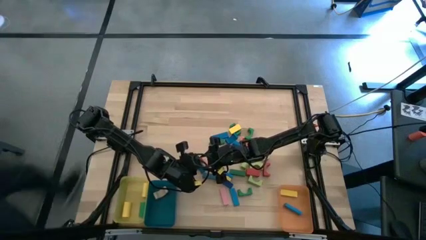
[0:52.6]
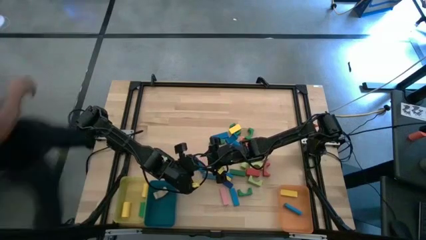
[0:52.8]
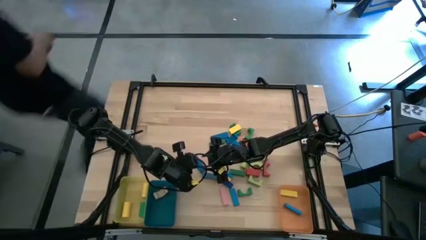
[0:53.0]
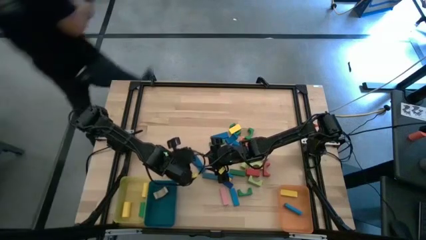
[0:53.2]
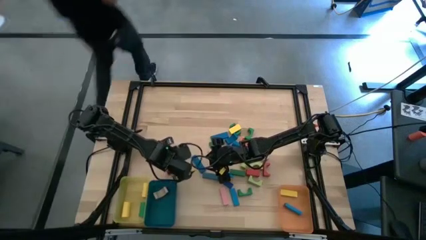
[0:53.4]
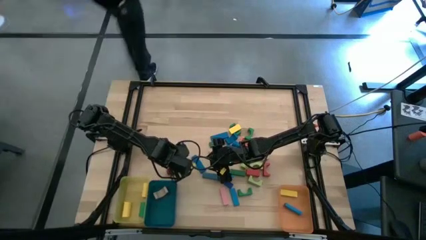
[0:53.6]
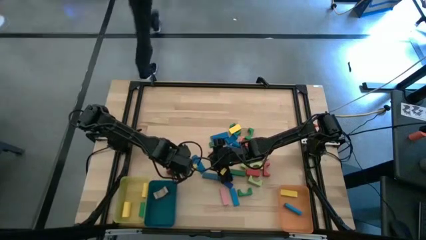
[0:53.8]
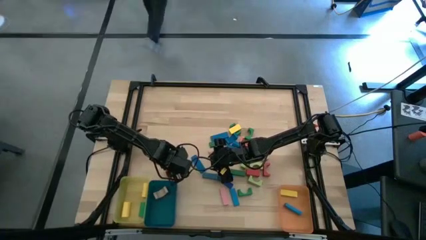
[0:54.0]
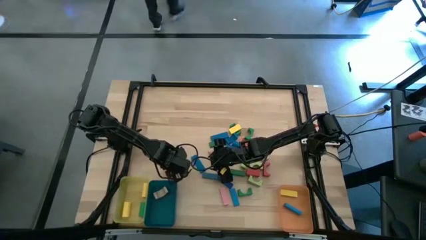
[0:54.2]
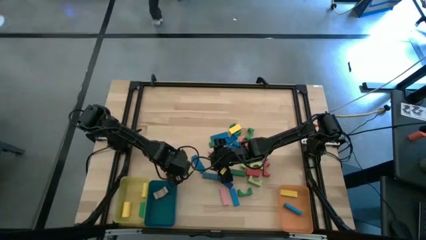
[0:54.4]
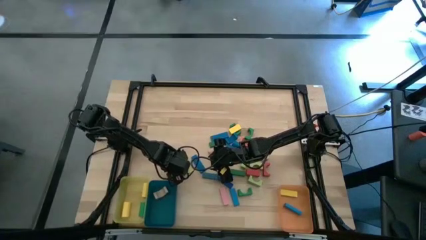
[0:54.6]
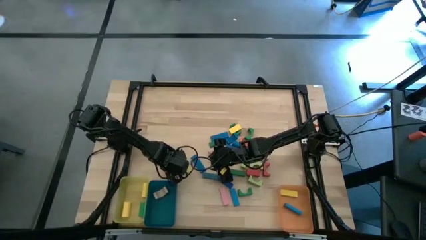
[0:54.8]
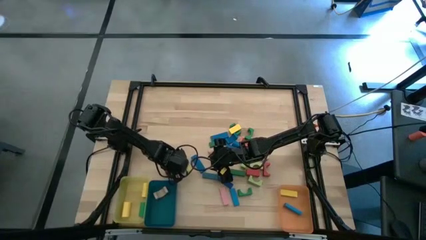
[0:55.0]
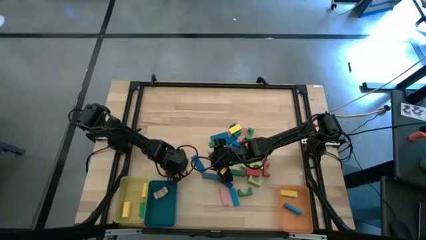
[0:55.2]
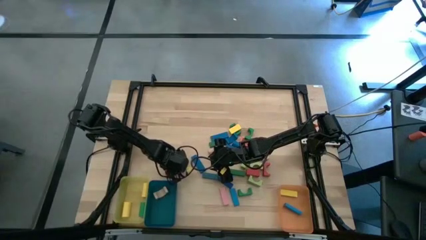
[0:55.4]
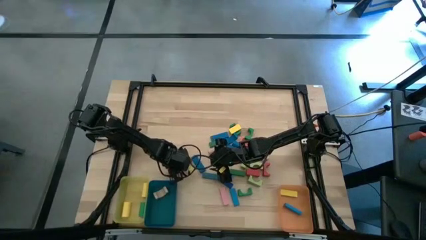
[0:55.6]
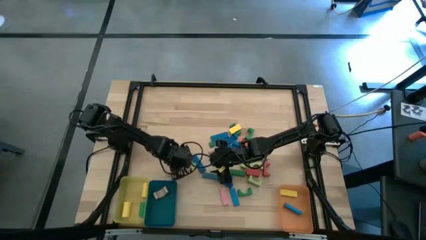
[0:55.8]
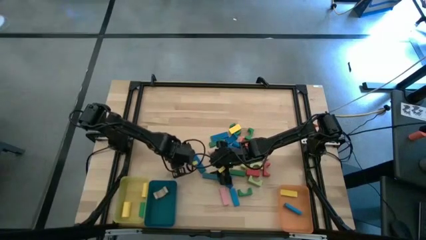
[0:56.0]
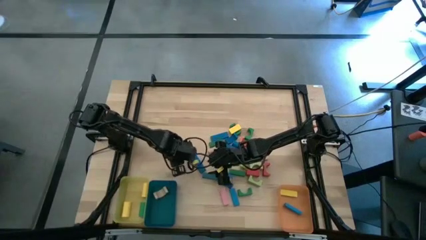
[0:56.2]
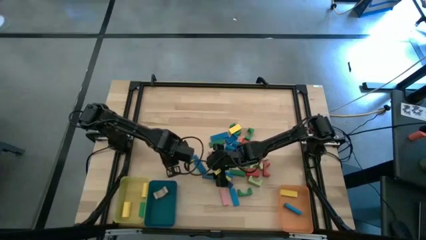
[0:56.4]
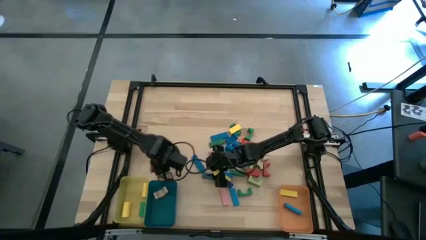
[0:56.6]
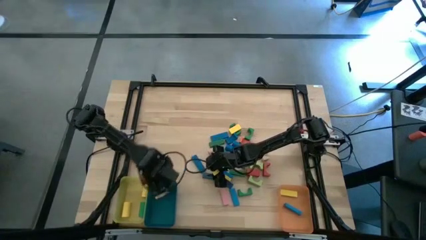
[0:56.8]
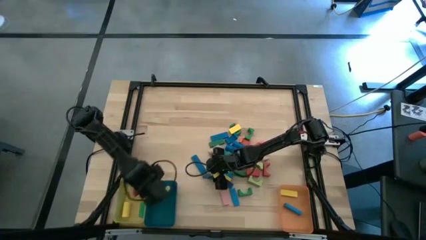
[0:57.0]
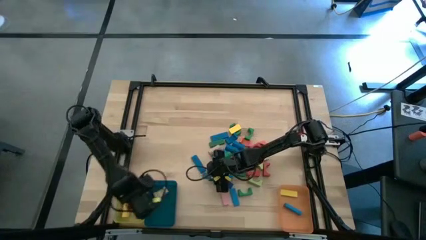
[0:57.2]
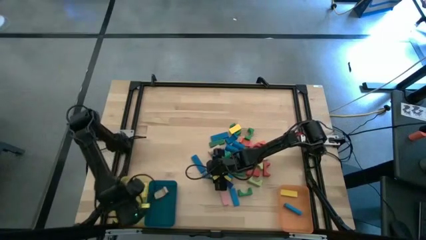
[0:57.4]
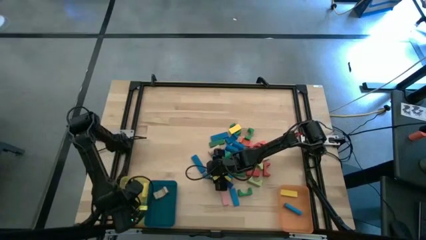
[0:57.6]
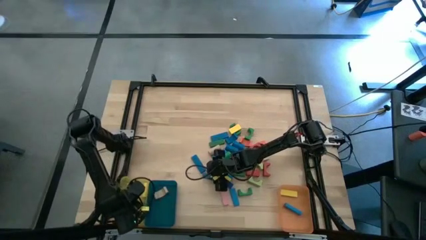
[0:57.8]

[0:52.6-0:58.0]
Task: Sort blocks by size
Put the red cylindrical block into the yellow bin

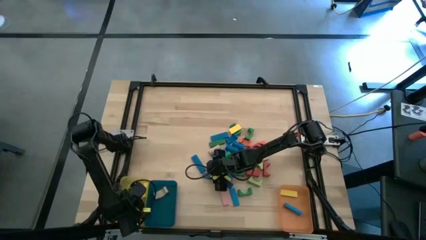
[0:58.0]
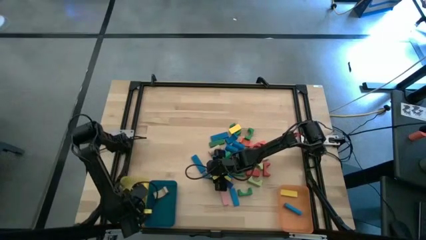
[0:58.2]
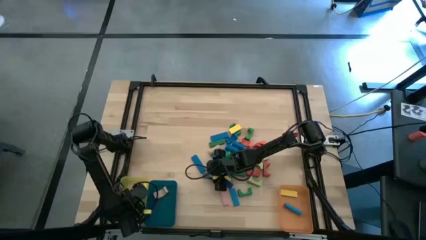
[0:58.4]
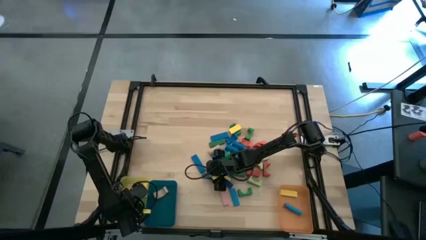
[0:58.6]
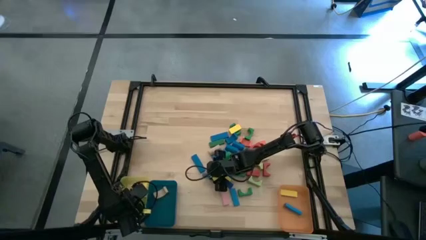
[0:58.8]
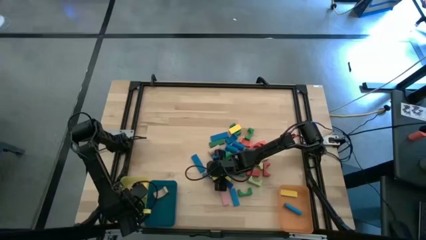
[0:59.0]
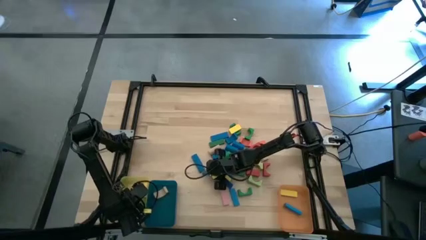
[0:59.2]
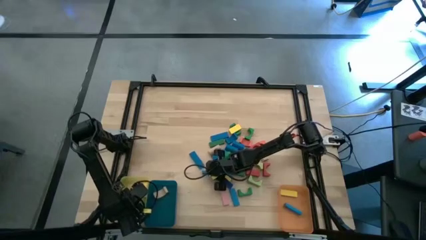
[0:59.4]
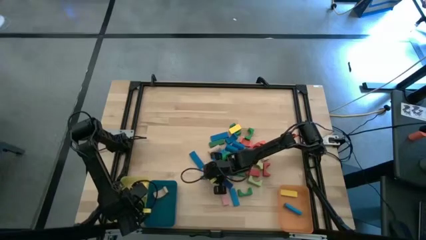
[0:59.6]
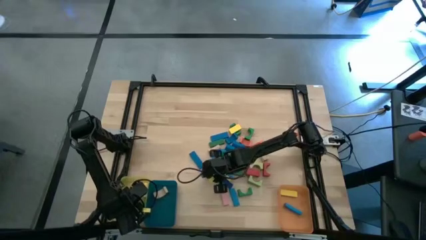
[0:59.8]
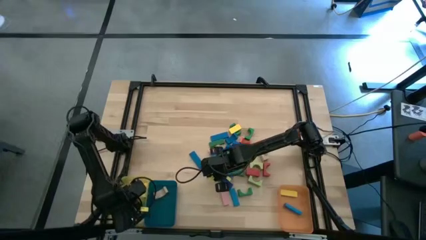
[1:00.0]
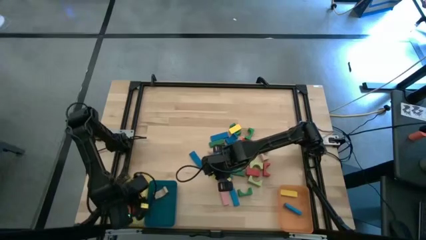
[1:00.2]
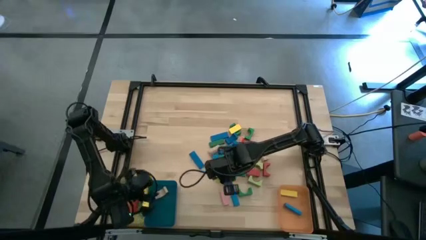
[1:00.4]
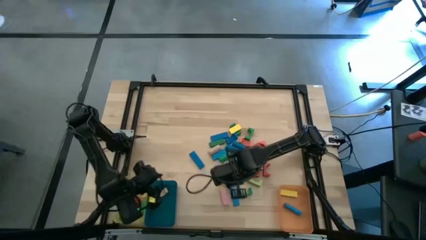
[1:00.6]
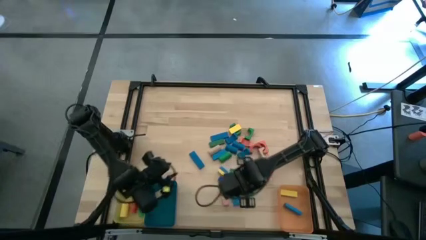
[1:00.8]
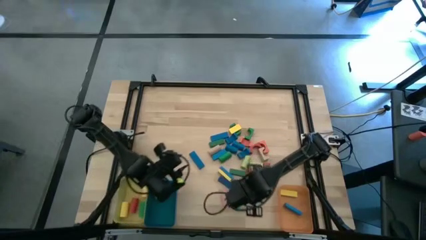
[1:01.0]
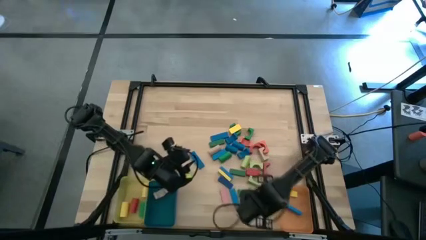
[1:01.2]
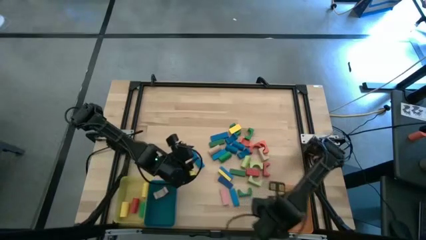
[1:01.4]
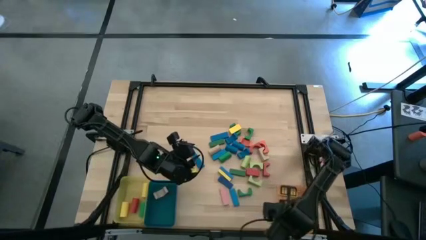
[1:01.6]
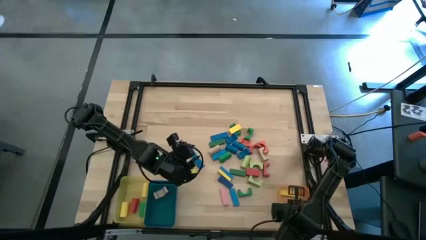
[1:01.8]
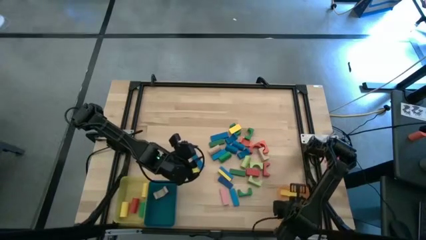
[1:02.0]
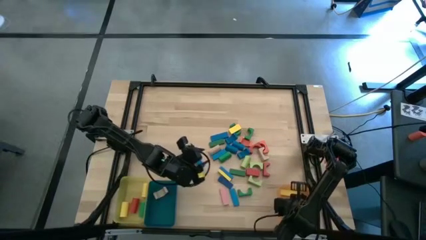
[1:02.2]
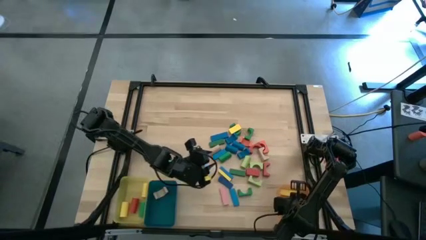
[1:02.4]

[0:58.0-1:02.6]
Put the dark blue rectangular block into the orange bin

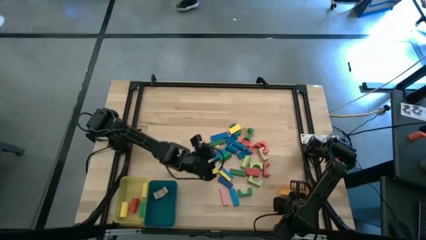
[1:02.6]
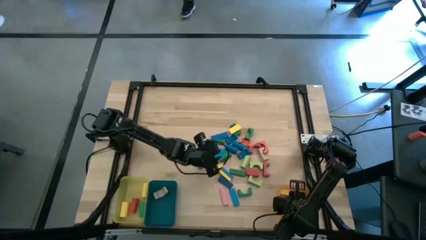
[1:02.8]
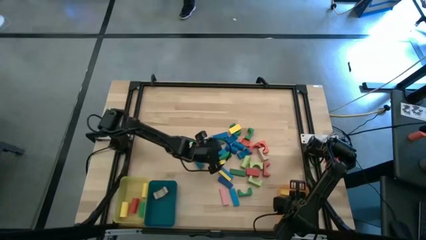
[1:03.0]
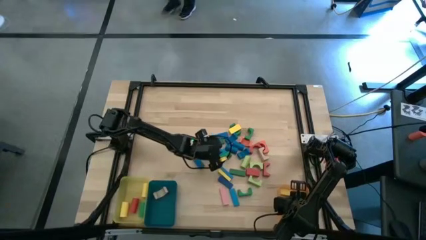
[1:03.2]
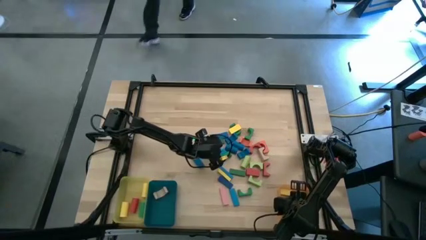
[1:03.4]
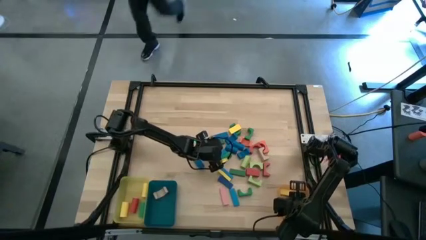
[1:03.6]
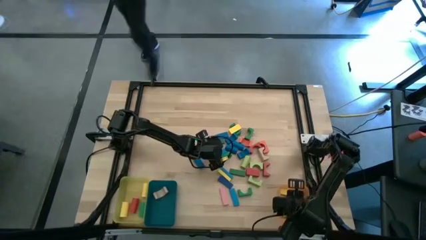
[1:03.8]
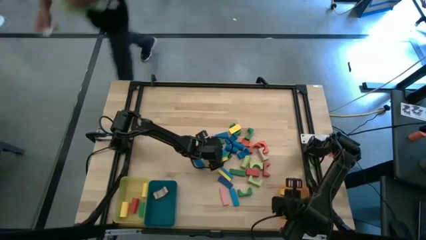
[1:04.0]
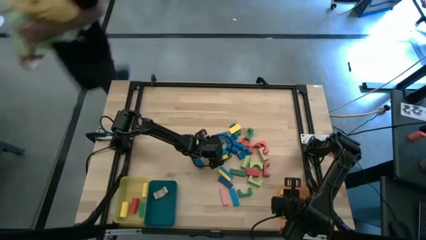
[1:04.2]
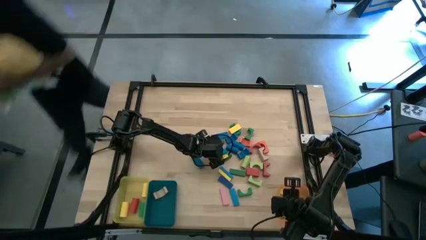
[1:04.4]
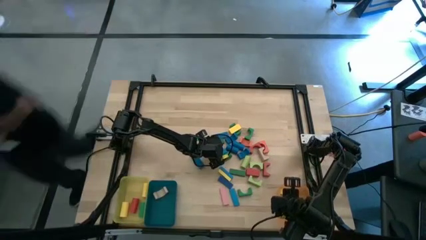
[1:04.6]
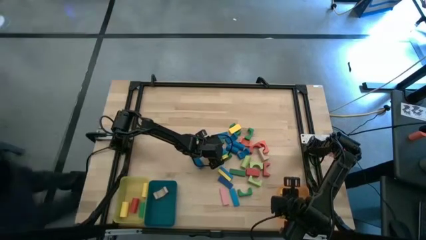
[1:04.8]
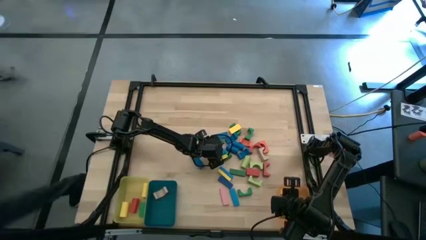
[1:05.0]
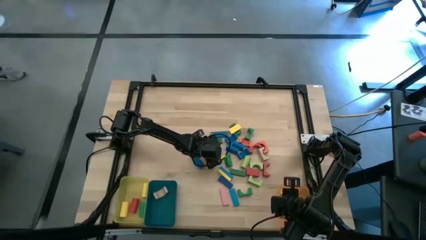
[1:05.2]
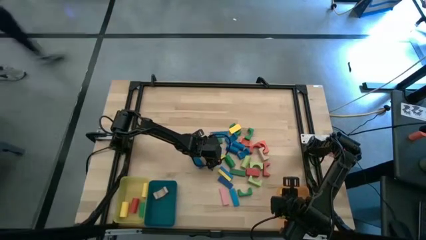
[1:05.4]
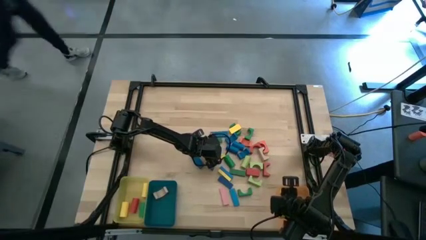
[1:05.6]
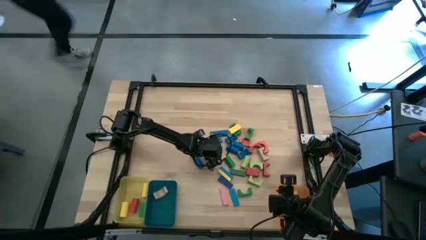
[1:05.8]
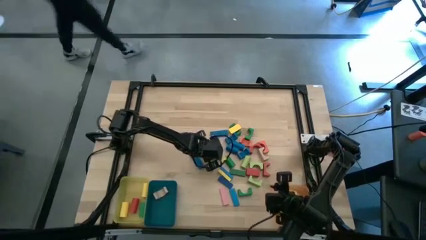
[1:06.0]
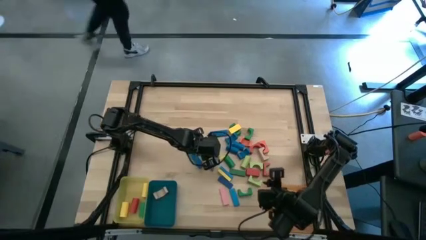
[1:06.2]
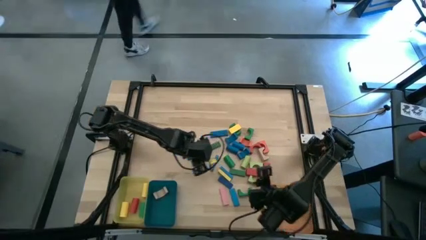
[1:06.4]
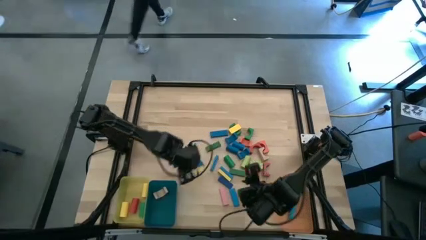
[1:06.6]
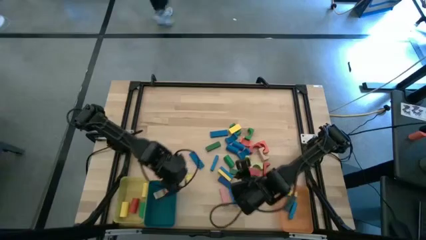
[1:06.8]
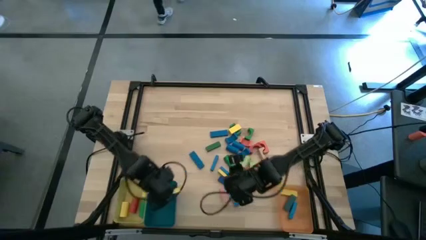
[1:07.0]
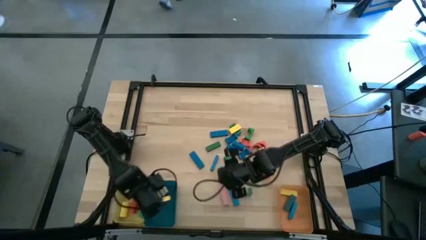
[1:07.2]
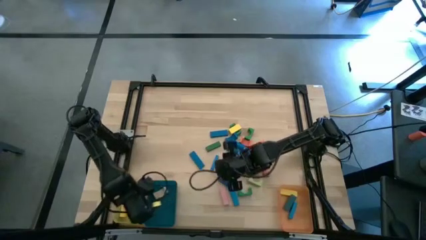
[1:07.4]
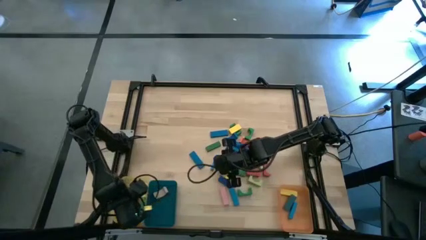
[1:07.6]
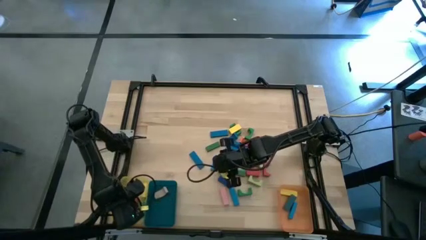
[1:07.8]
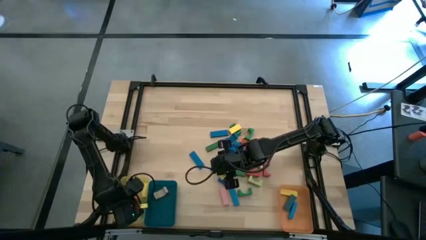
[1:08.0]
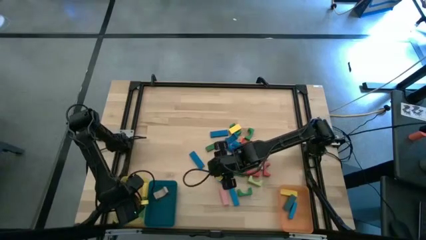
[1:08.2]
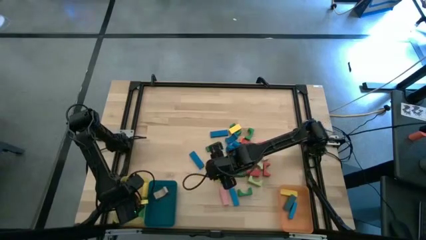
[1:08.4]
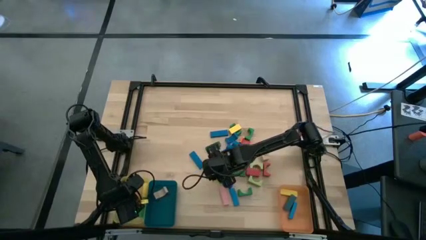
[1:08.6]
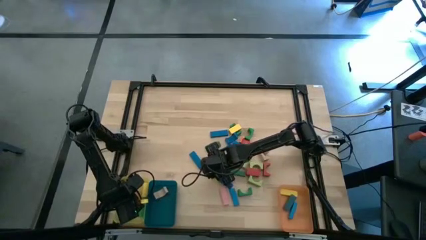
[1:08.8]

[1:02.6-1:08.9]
Put the brown cylindrical block into the blue bin

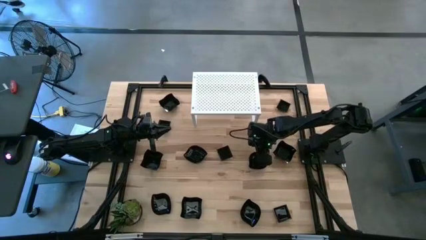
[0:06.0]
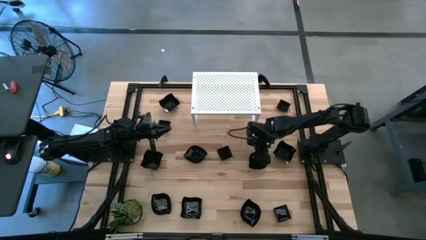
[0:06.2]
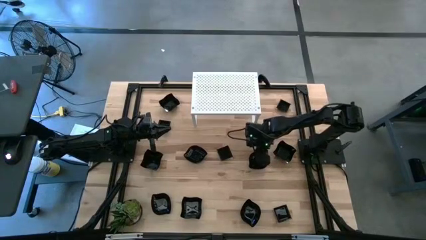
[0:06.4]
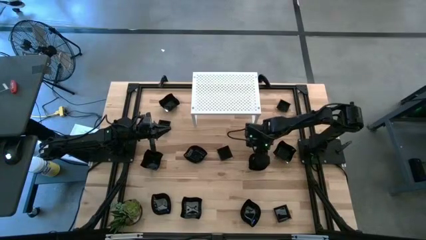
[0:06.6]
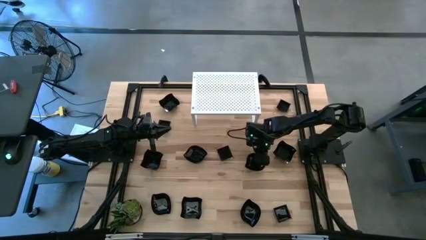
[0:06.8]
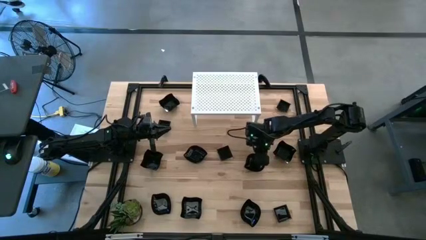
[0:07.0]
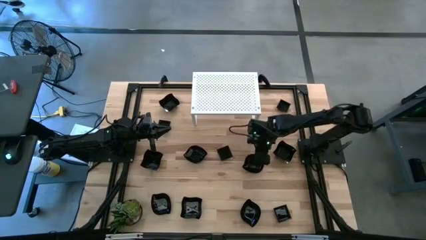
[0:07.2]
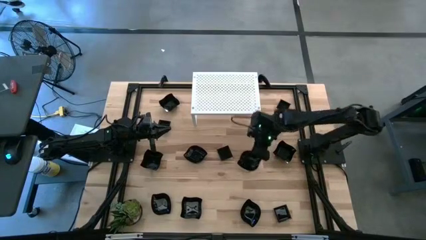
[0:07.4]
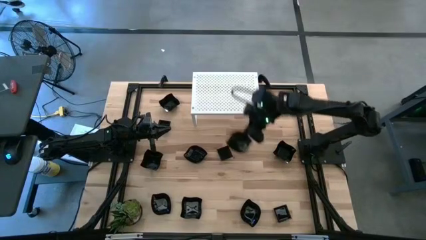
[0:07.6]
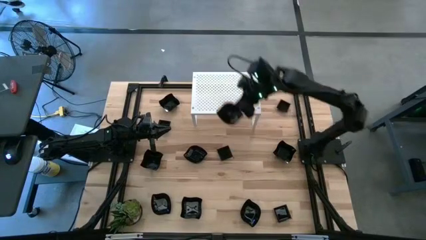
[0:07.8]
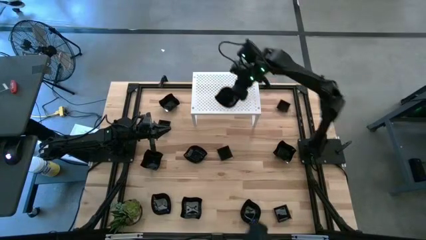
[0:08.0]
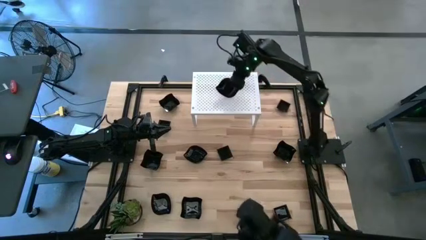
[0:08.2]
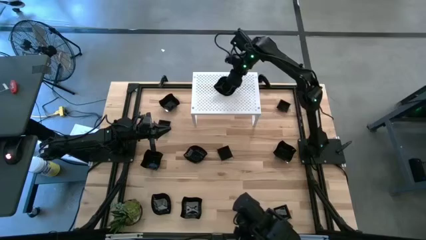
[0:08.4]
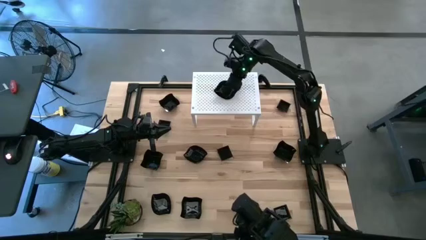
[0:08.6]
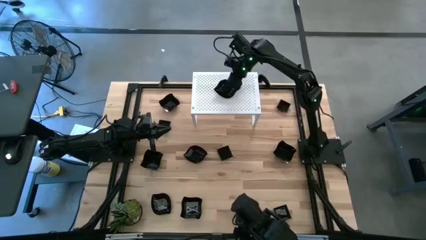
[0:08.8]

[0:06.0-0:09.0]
Task: Pick & Place Mini shaped plates
Put the black leaf-shaped plate on the shelf
